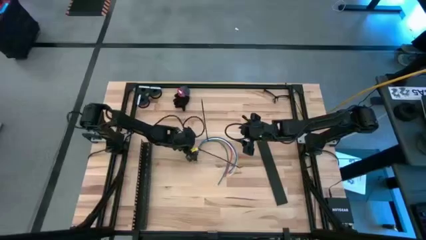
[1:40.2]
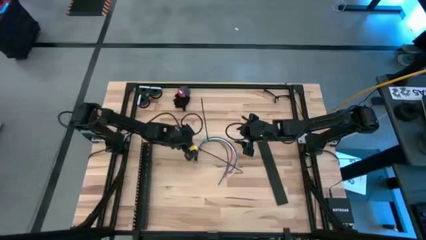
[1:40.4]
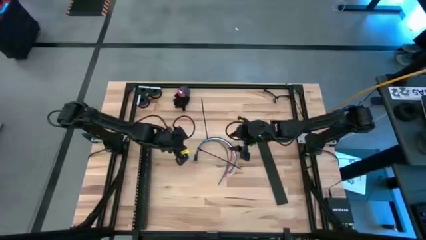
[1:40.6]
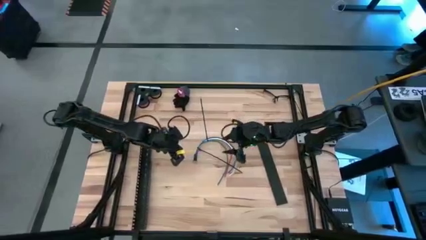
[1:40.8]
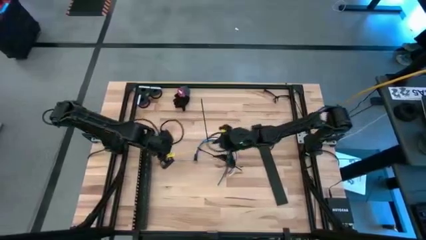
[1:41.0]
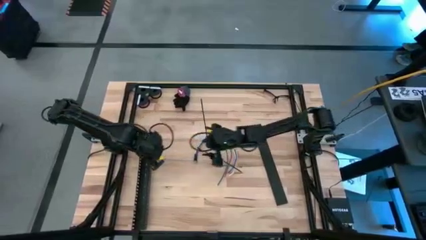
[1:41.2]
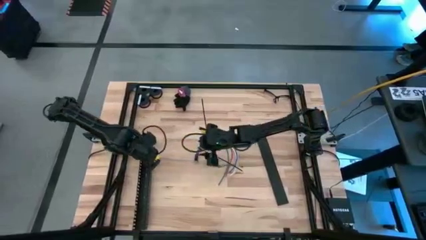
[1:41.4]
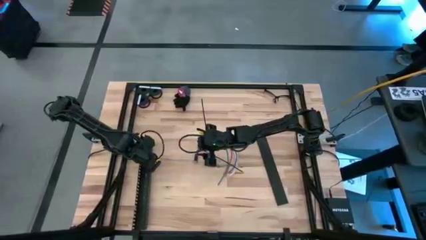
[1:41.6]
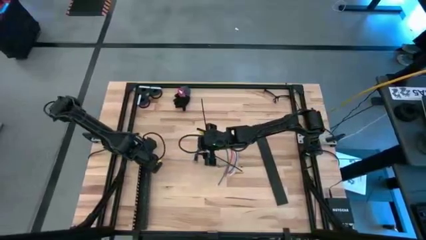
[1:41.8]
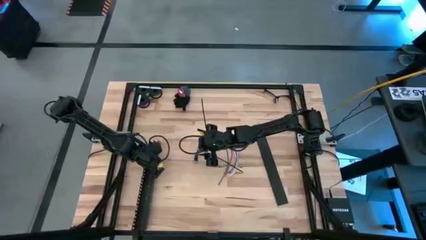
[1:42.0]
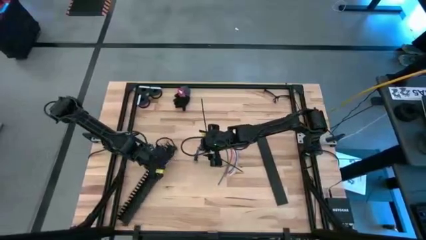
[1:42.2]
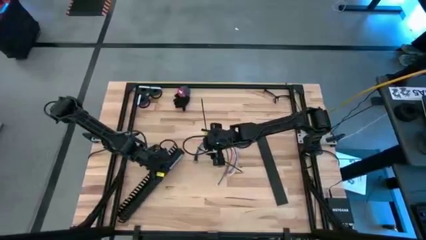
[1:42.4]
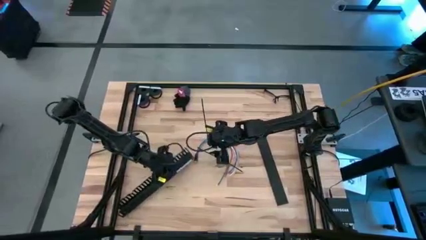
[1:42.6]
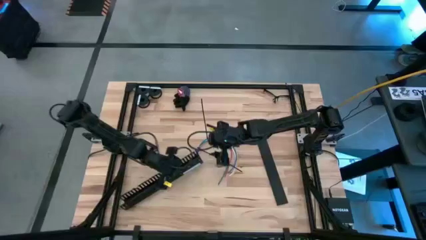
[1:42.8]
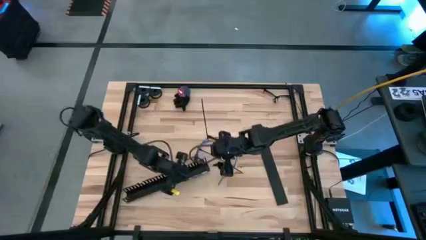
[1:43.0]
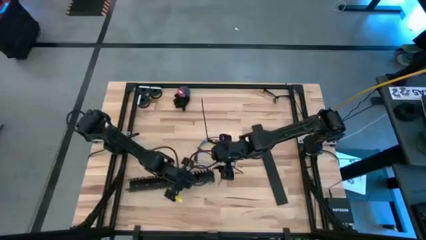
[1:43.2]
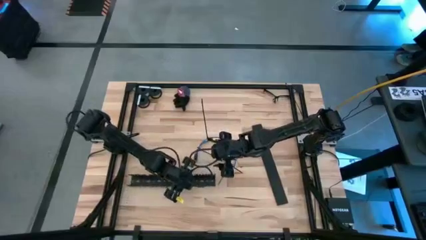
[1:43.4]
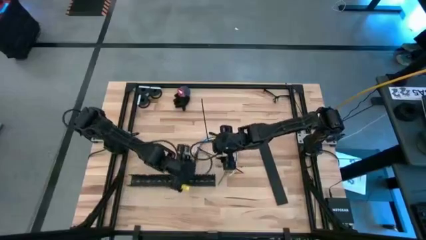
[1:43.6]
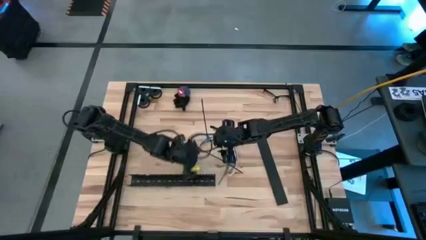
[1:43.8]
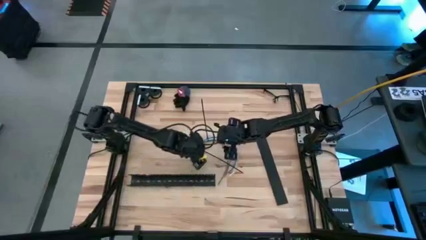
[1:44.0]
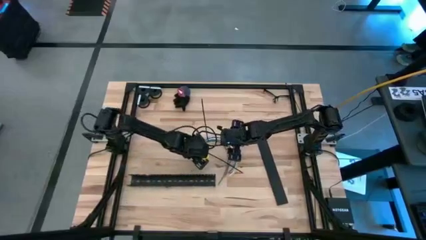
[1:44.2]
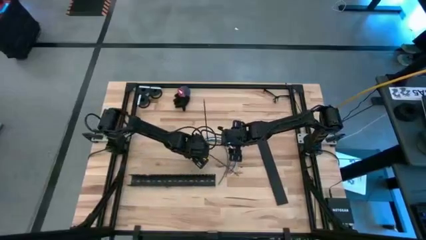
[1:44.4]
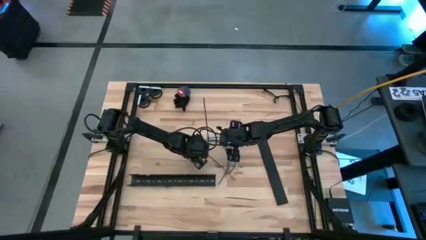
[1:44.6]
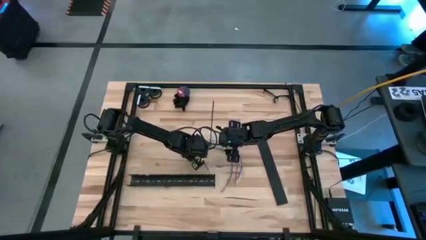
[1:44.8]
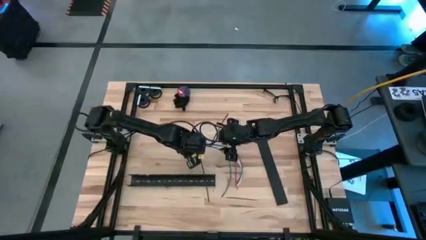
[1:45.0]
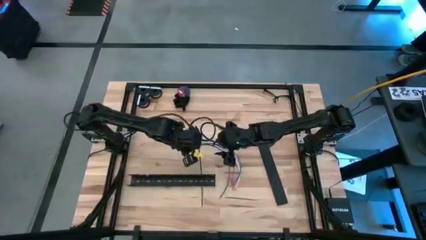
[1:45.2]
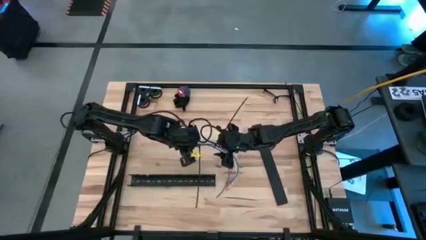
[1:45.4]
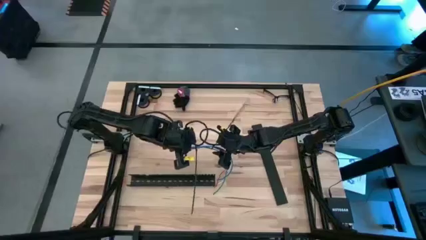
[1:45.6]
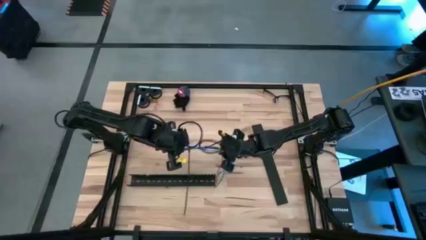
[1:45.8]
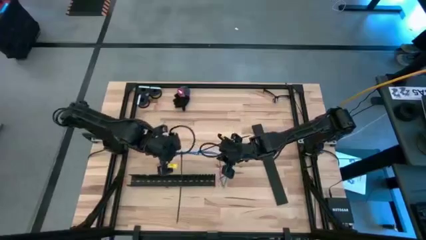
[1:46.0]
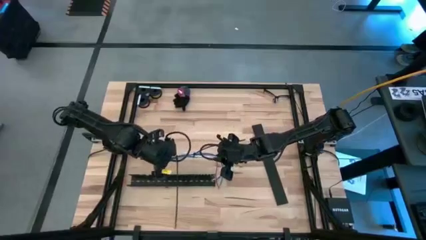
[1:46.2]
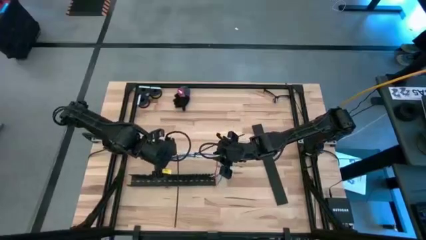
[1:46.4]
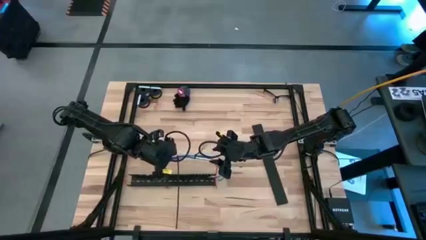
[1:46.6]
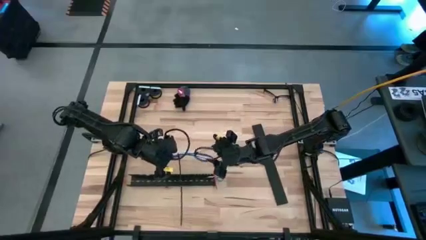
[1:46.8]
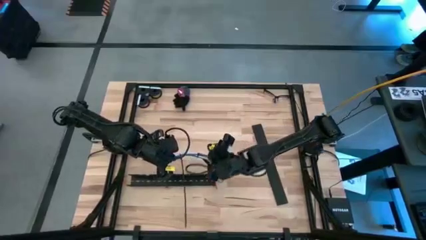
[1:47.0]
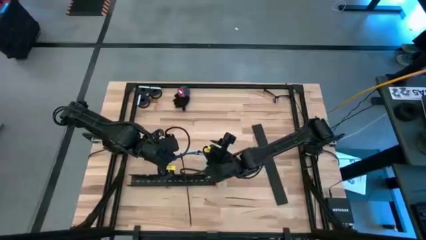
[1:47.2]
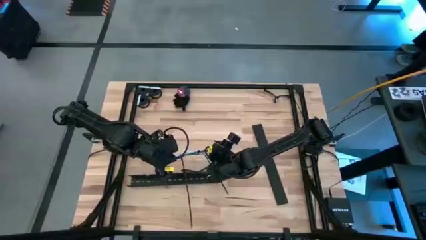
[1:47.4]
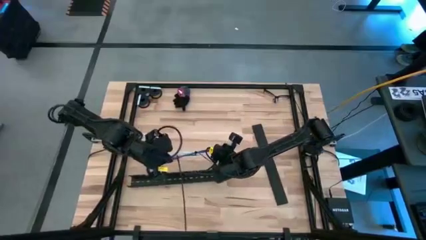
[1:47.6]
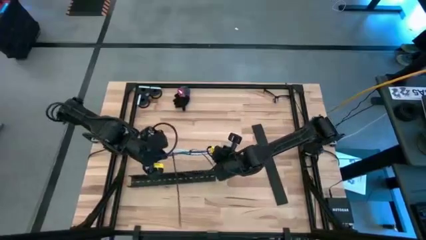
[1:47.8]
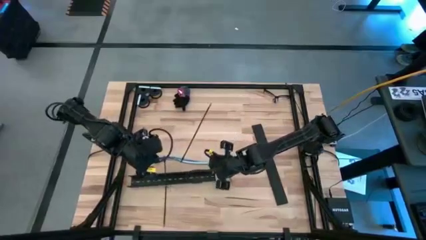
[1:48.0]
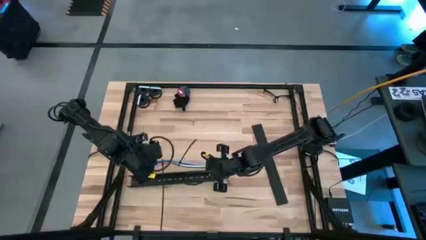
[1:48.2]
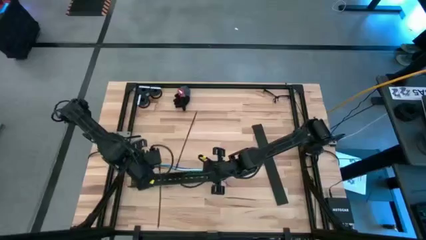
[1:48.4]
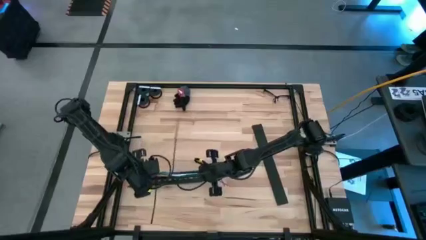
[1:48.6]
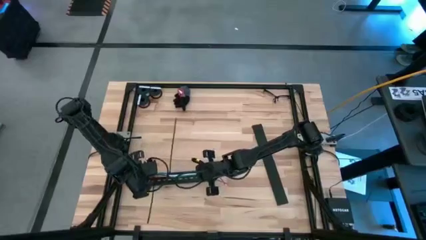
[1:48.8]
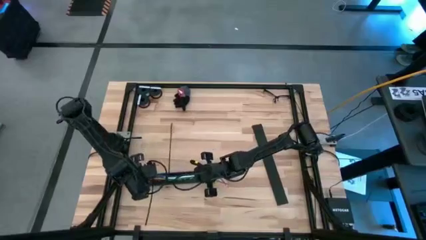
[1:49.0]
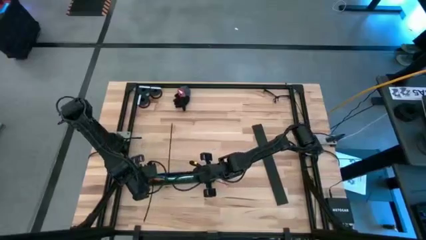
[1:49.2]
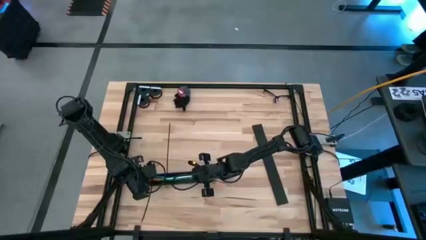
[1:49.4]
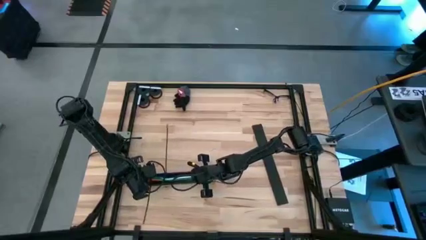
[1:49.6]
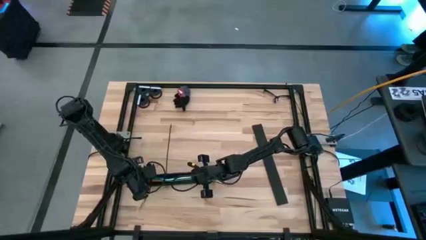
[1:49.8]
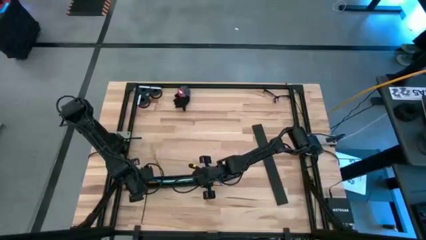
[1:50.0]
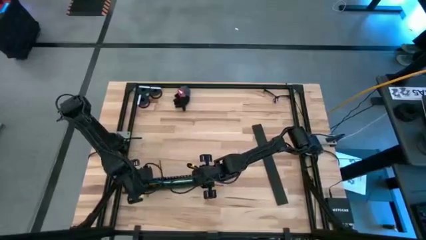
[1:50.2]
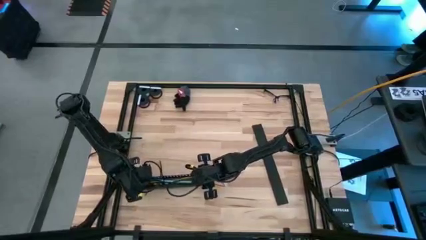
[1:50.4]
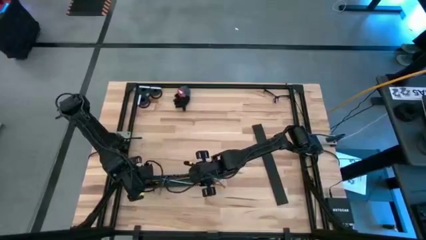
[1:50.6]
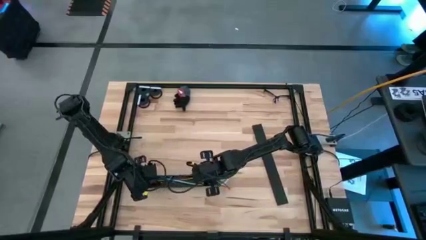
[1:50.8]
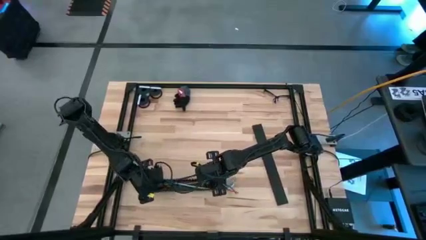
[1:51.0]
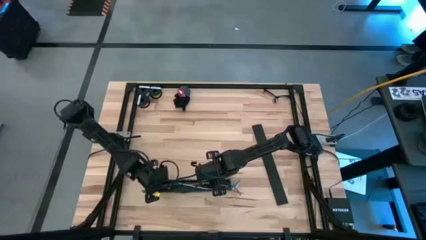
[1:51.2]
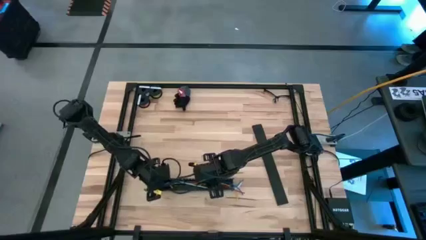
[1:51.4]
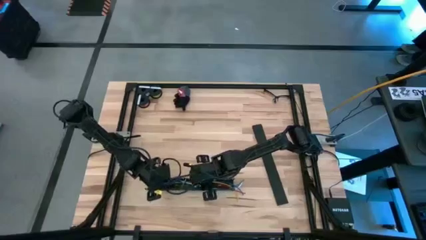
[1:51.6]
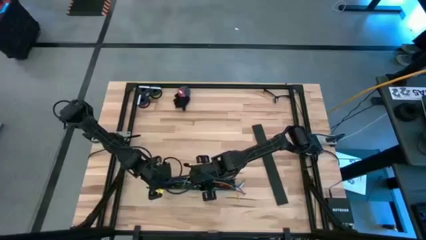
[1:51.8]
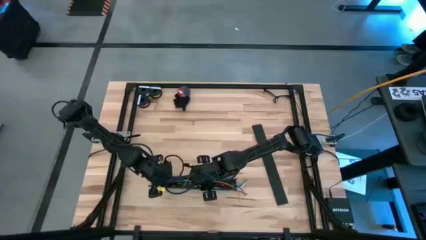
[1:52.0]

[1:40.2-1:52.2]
Task: Ziptie cables
Insert the zip tied cables into the black cable duct
